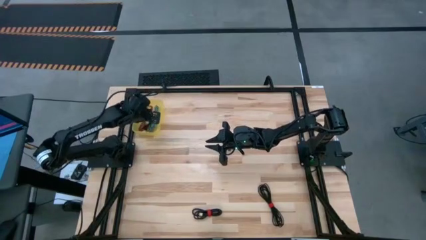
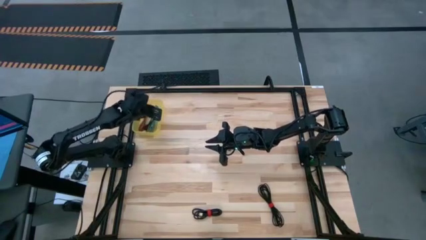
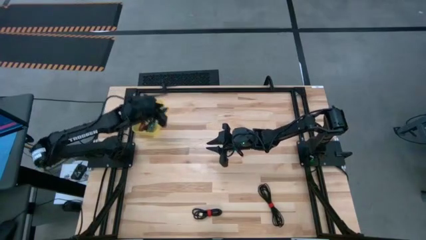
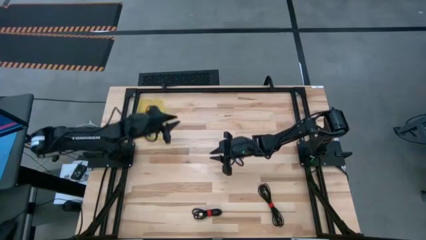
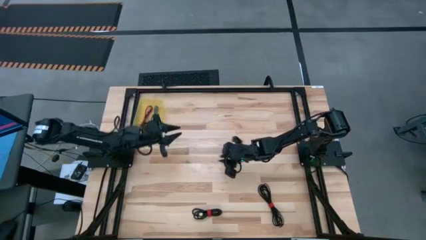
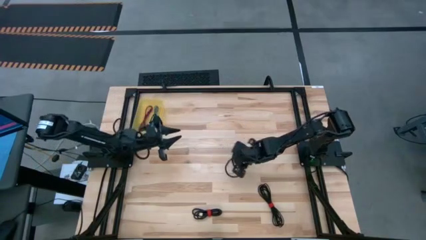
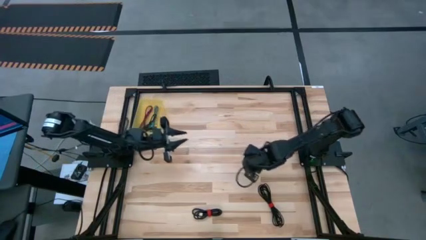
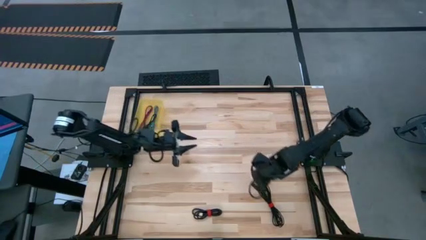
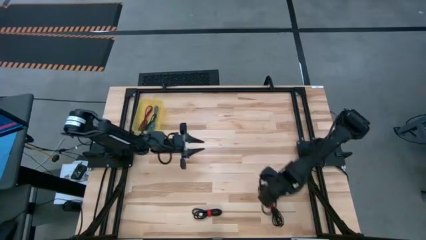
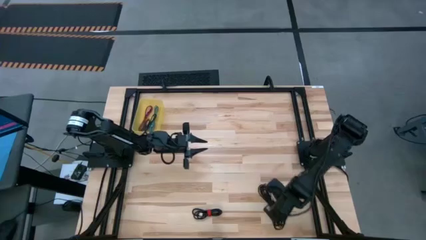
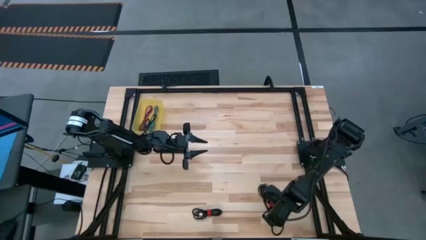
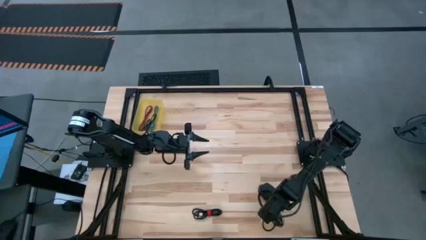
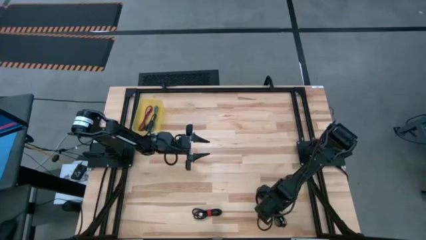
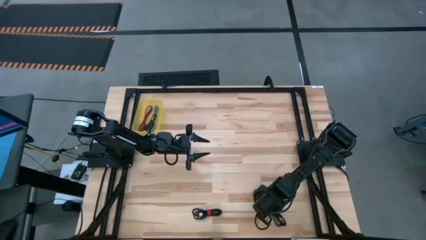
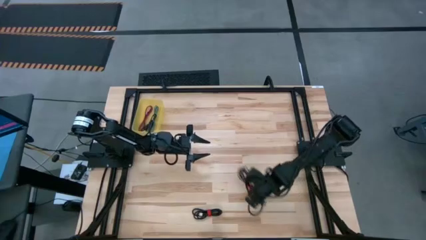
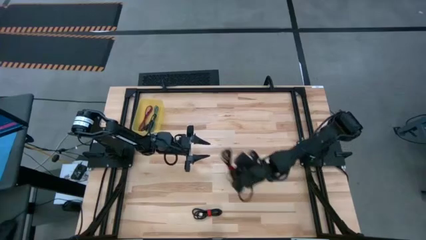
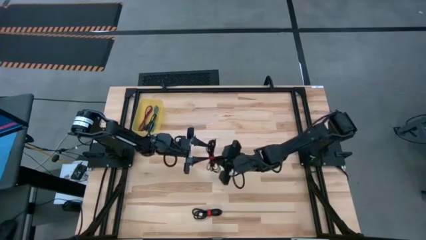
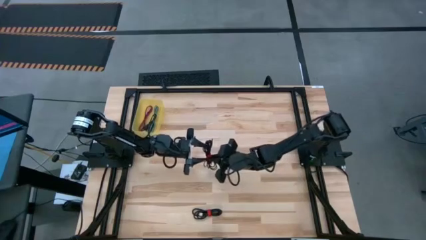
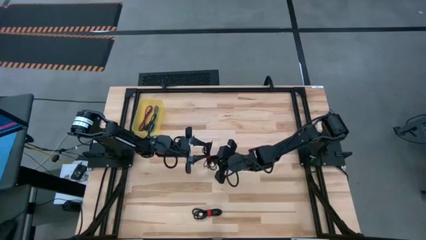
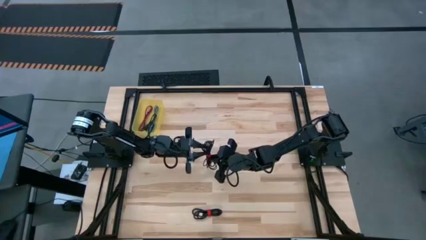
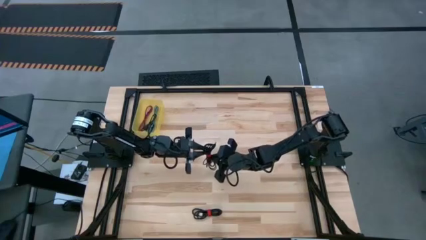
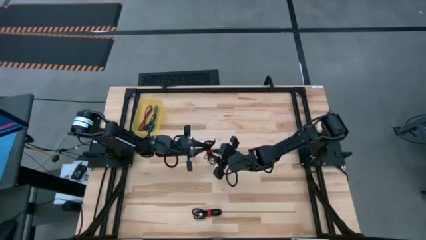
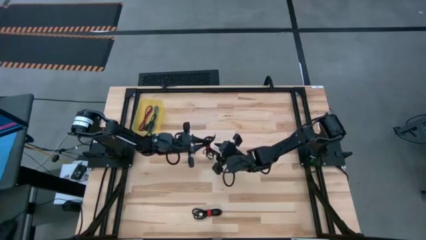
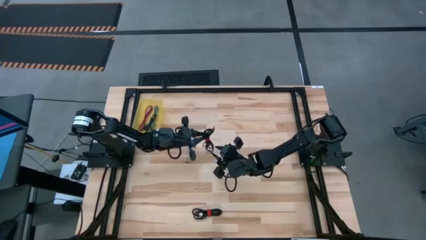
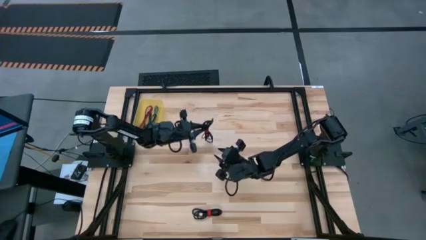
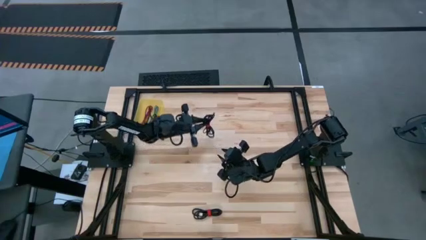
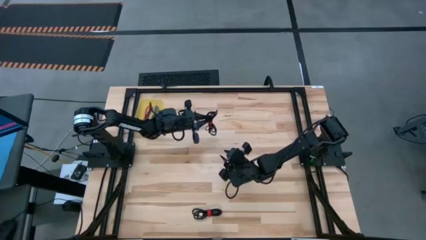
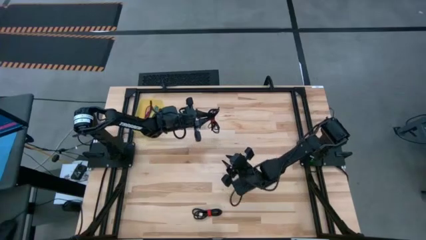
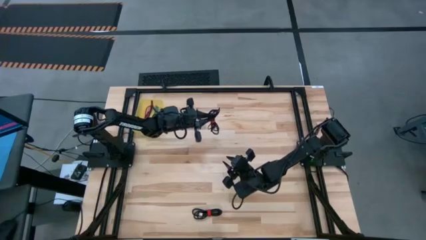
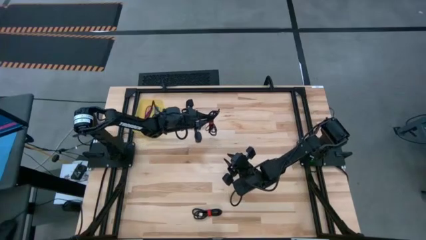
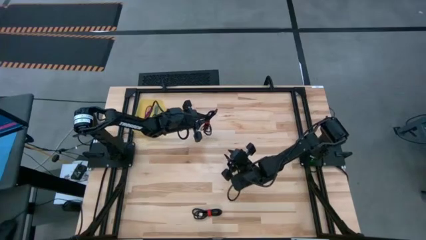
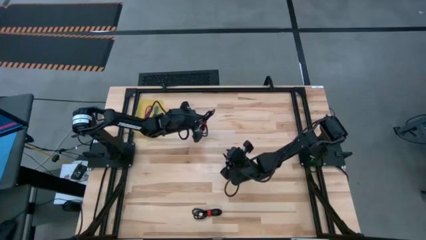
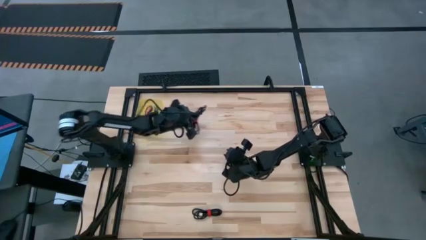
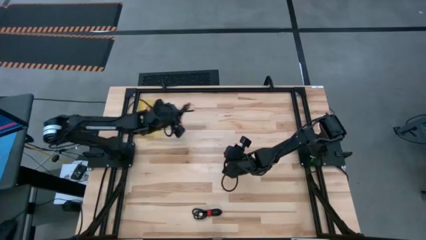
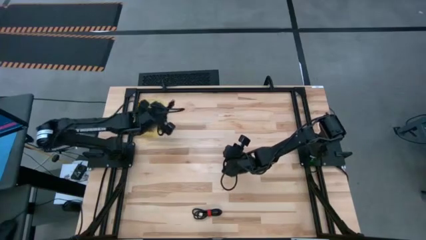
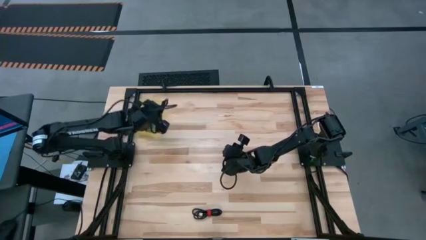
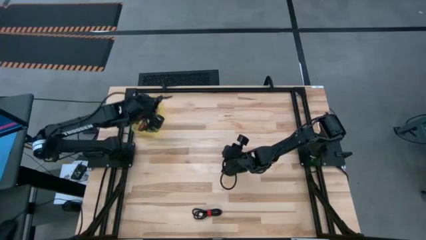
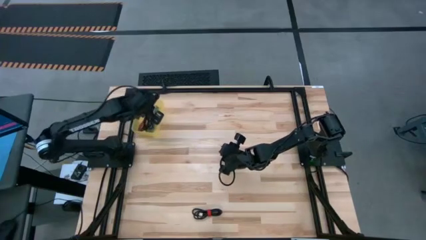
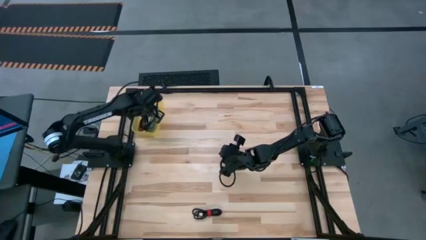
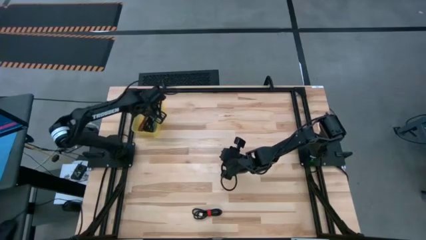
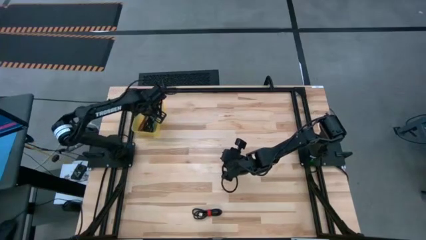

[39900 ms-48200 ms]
Task: Pick and place USB-C Cables
Put the right black and red USB cable into the yellow bin

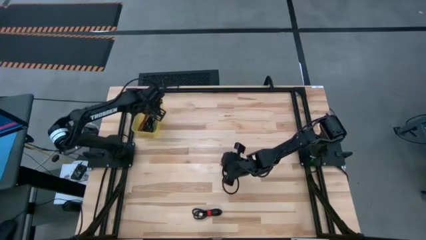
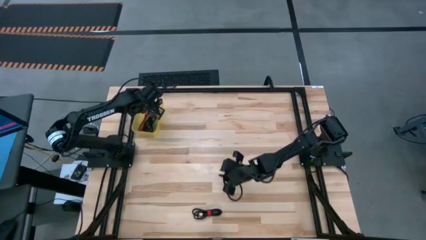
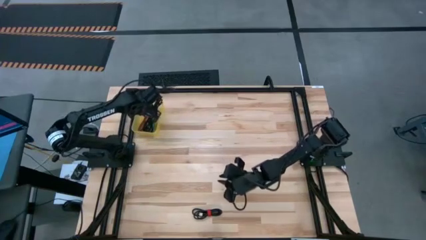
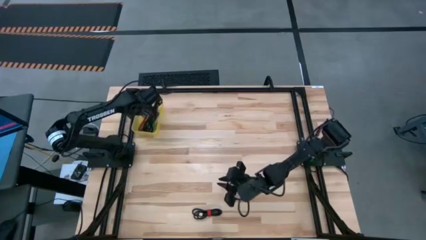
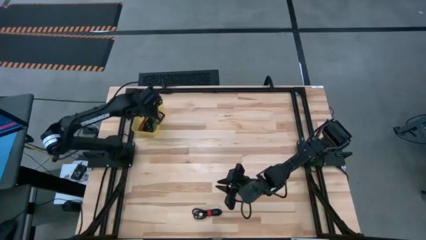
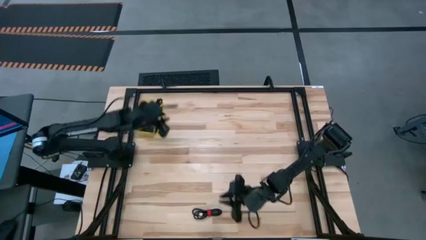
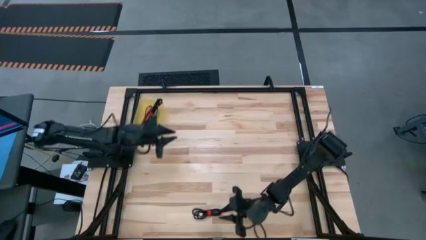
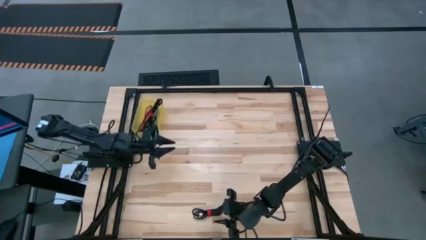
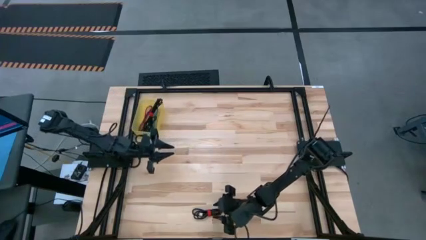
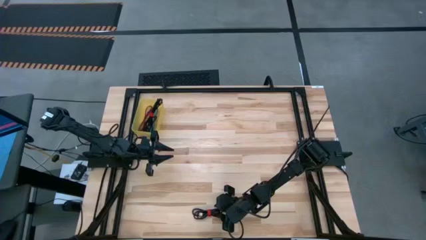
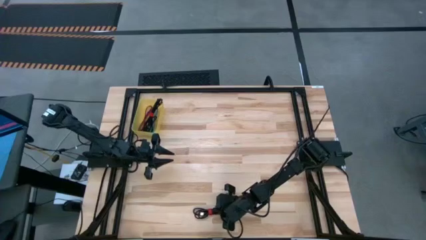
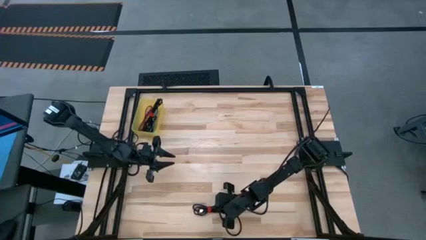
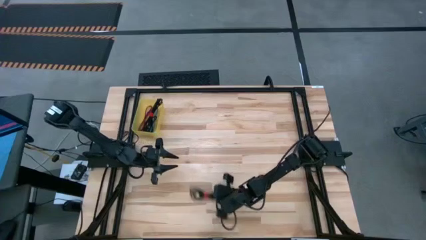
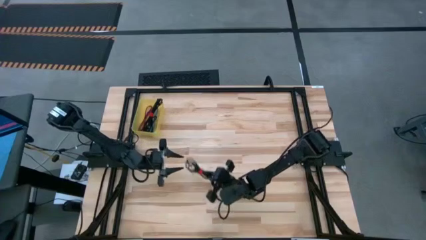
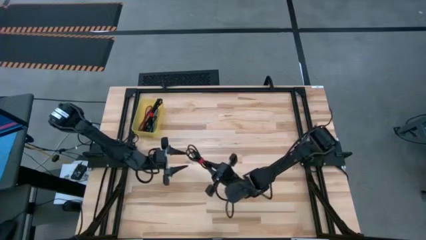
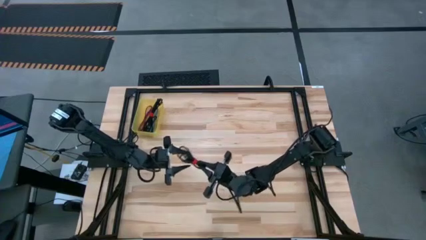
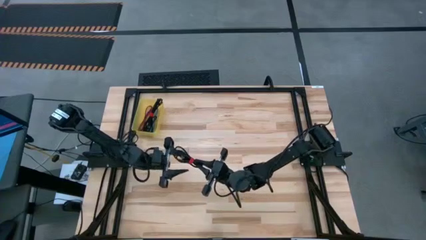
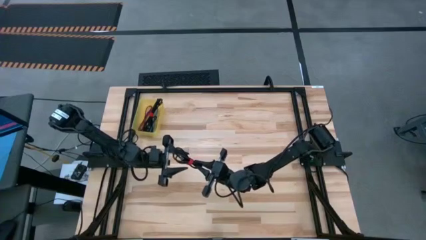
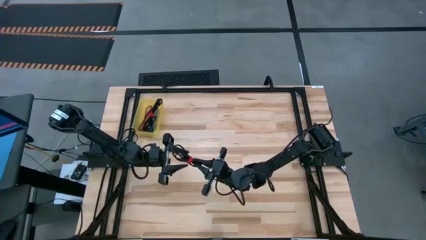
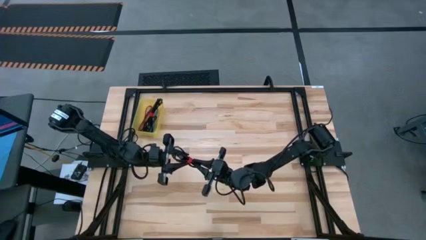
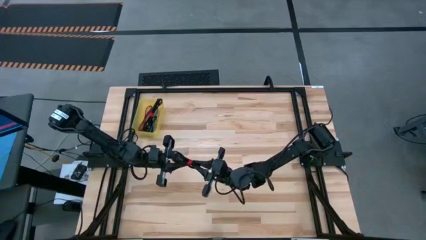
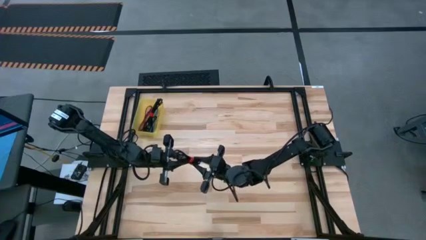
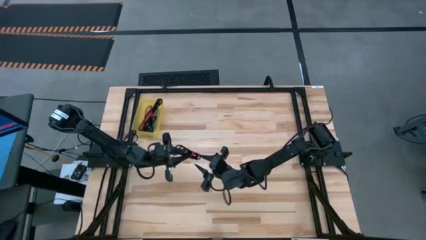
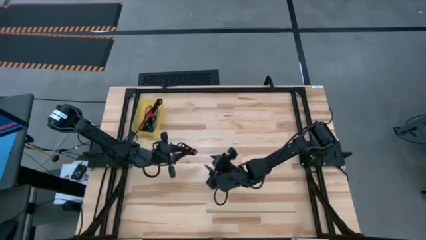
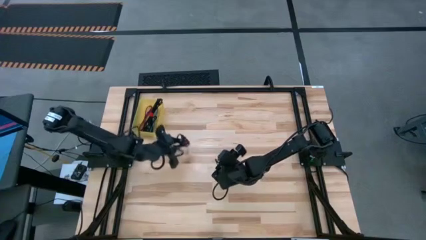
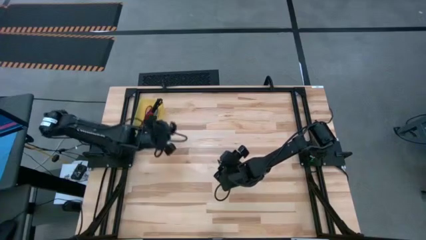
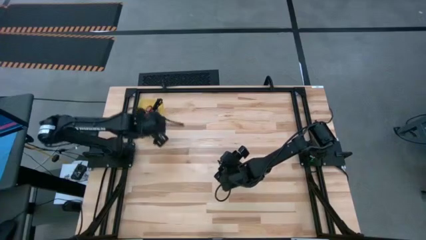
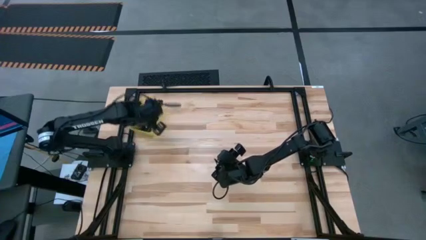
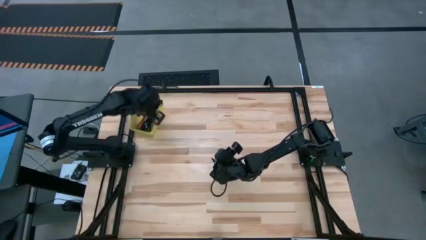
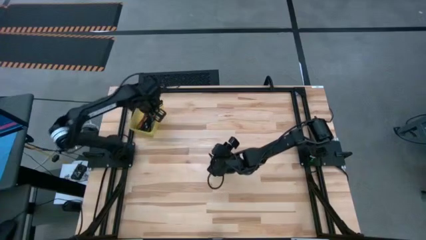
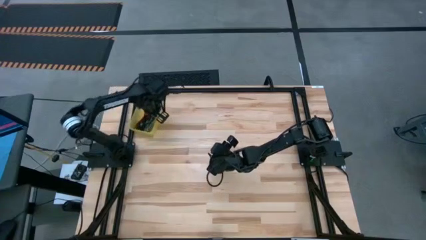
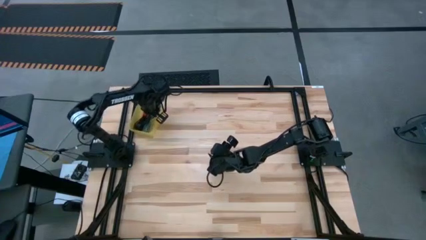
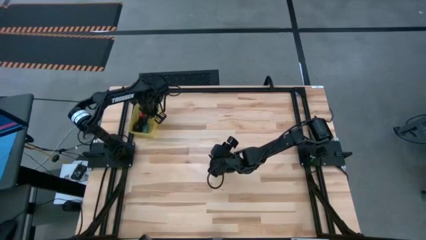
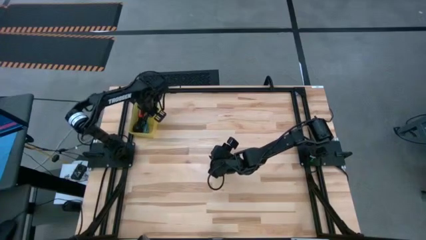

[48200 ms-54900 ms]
Put the black, red, and black USB cable into the yellow bin

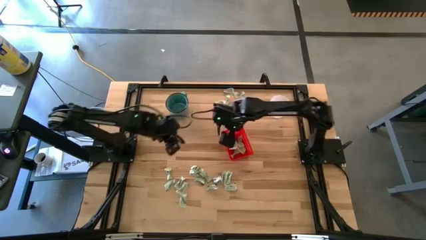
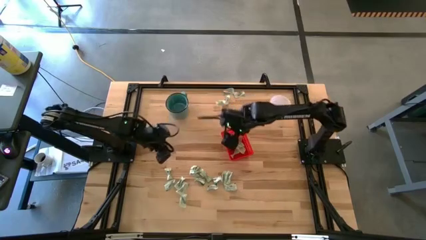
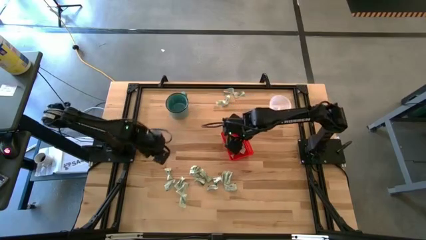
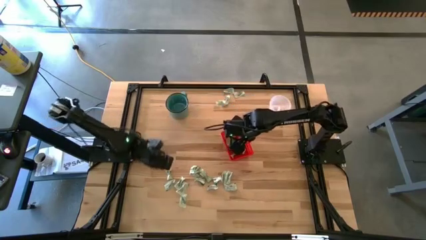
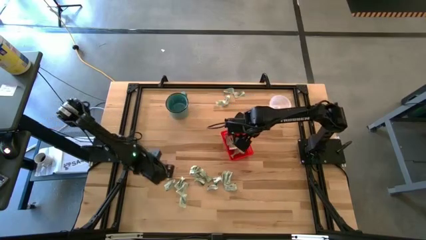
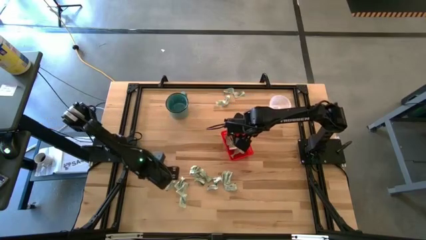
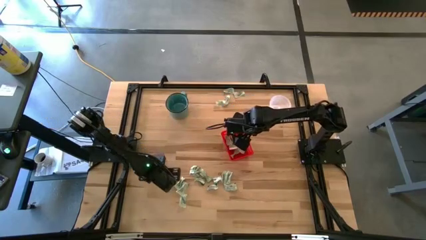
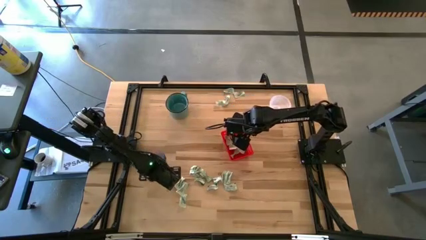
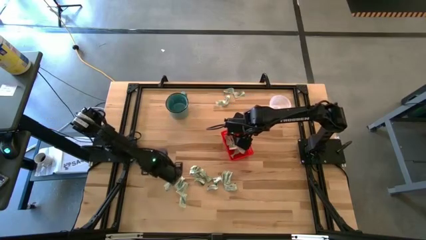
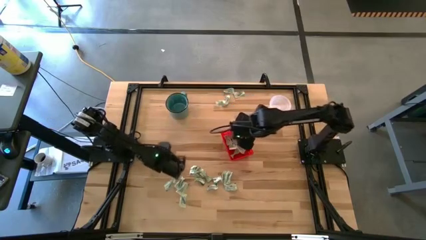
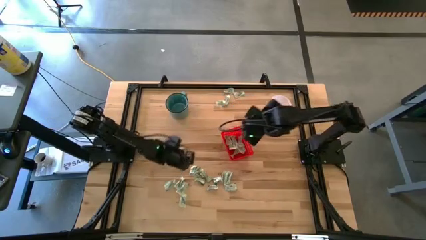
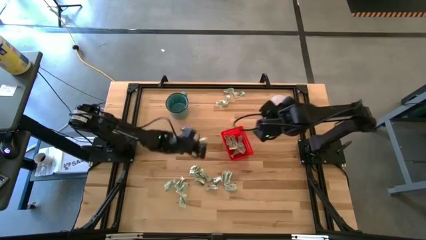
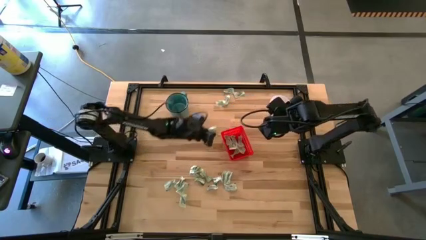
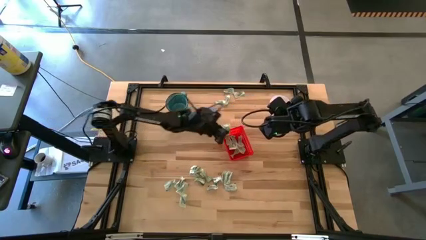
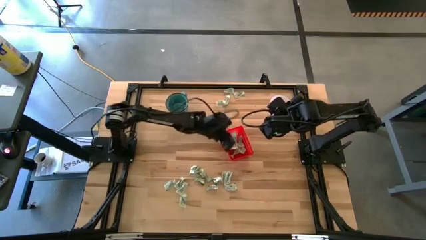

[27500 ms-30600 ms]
Task: Pick and place items into bin
Put the stevia packet into the orange bin
